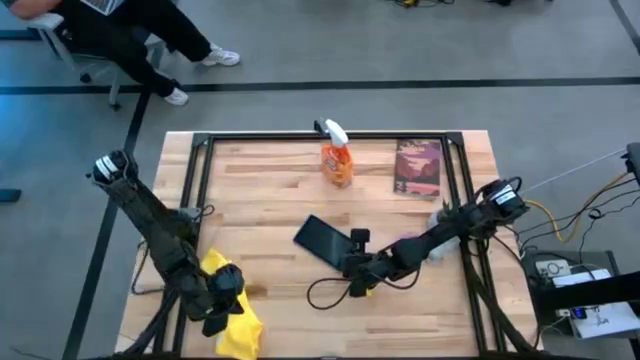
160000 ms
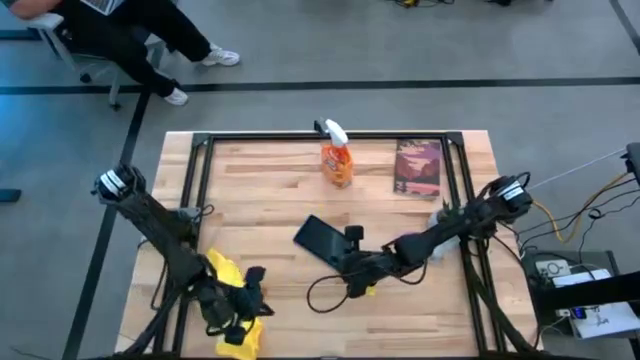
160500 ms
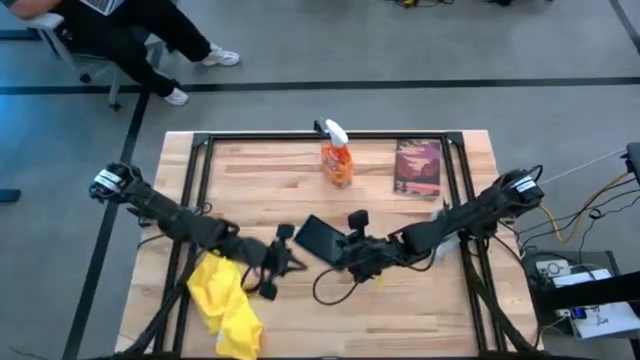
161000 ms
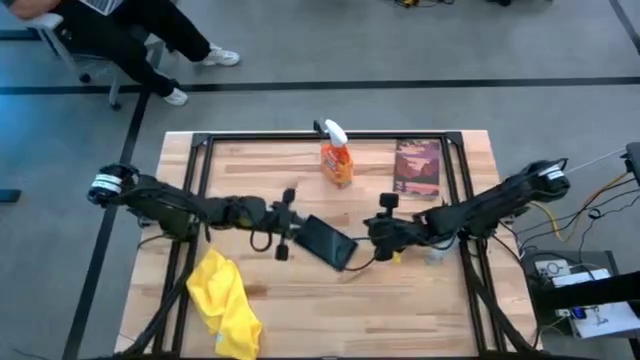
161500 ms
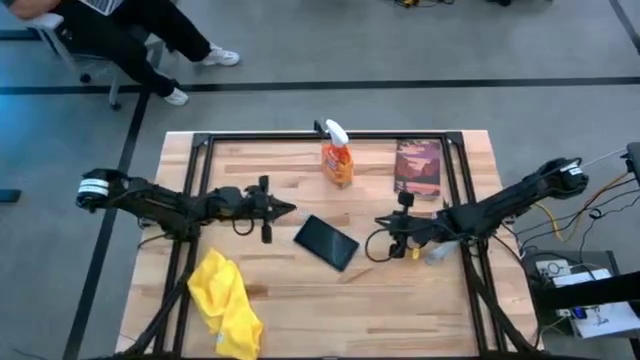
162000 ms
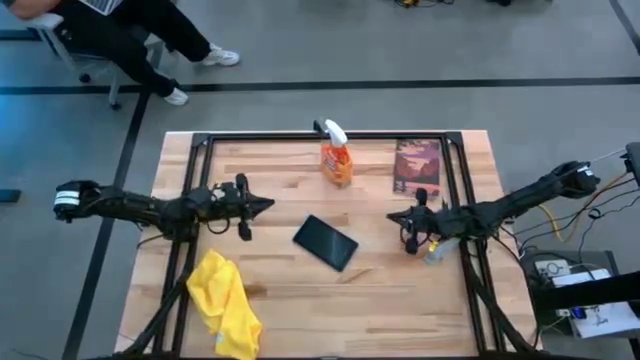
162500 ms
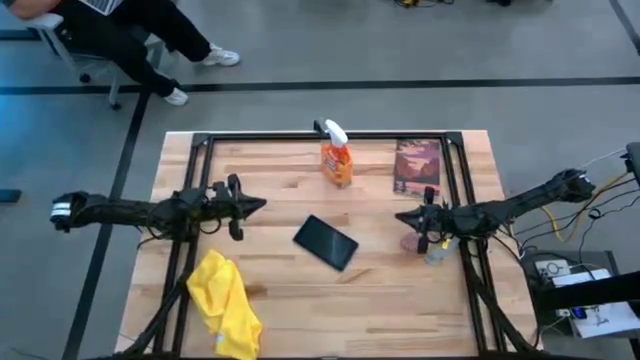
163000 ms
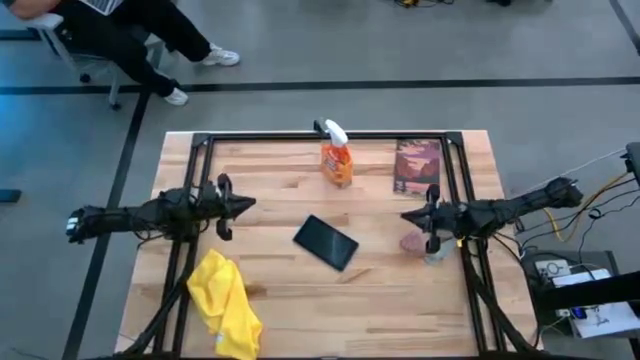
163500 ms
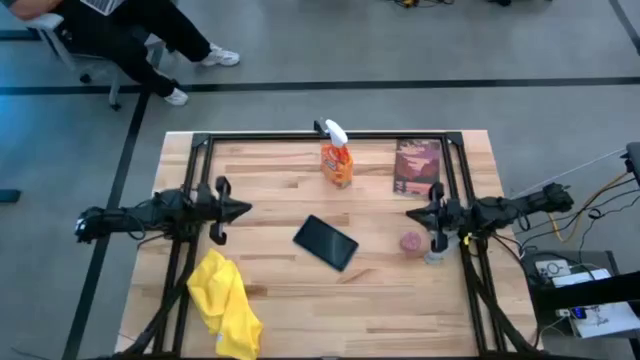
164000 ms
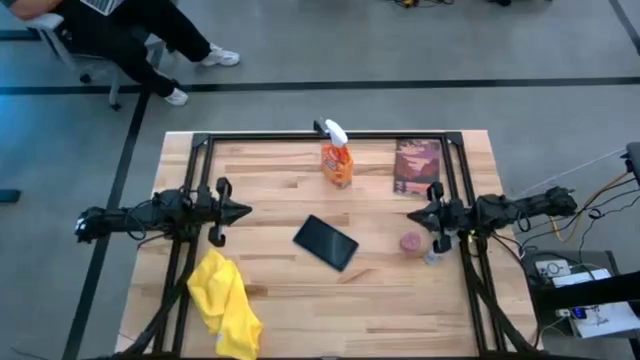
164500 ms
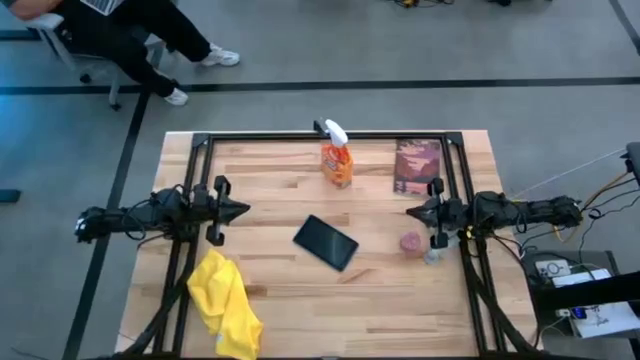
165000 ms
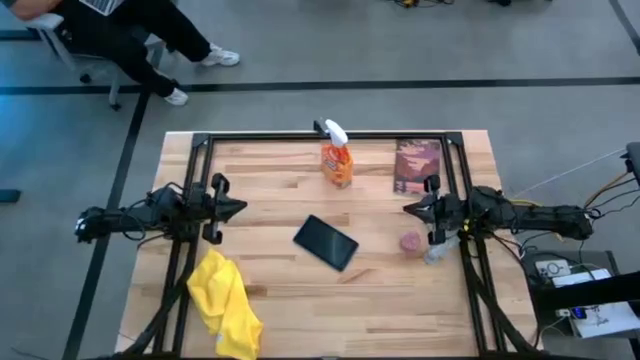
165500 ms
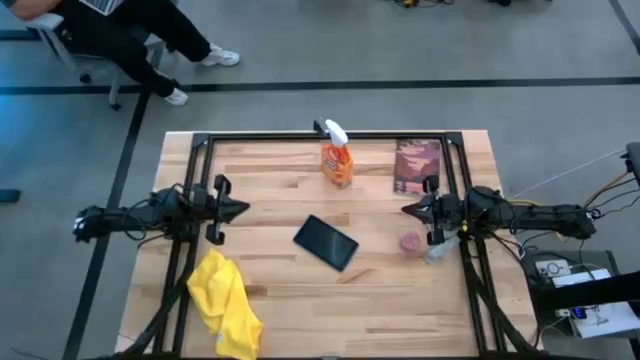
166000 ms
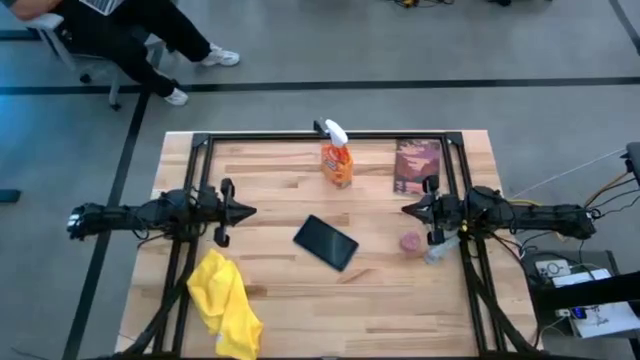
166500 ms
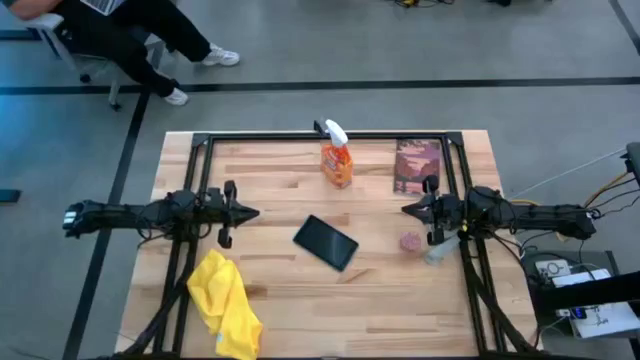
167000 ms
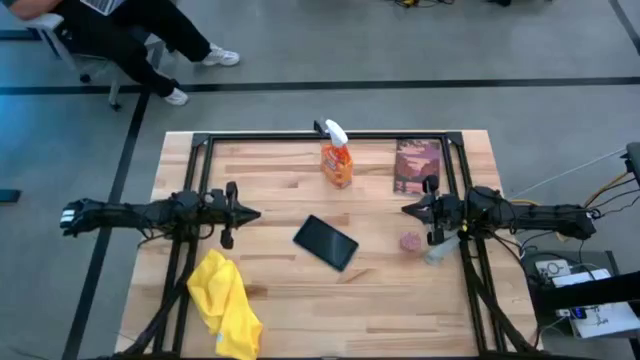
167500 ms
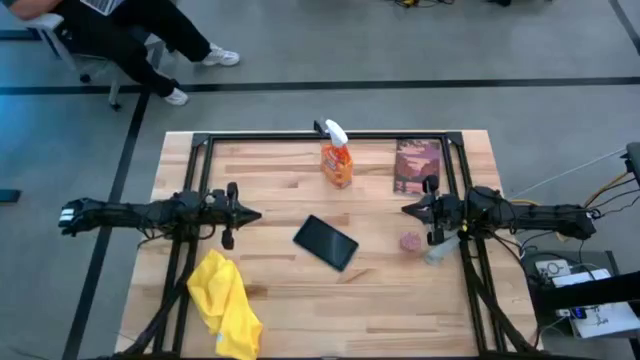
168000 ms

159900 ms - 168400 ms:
Task: Apply microfiber cloth
Return to Home Position

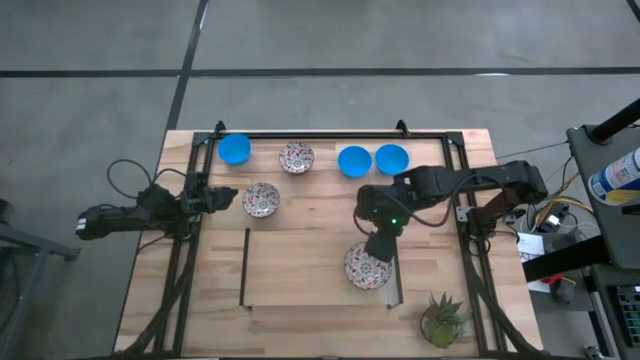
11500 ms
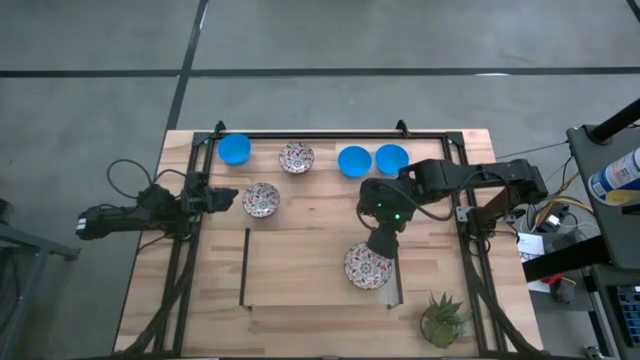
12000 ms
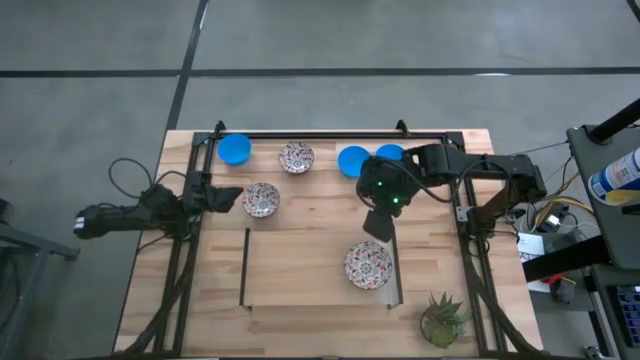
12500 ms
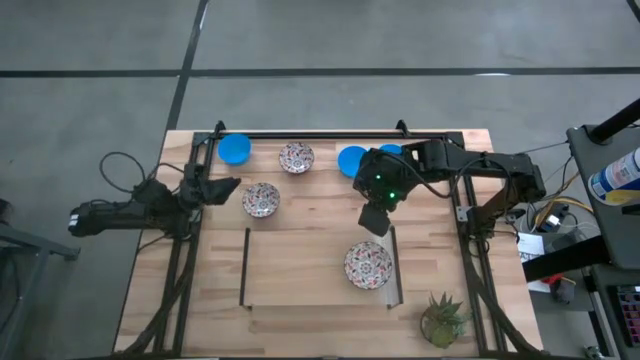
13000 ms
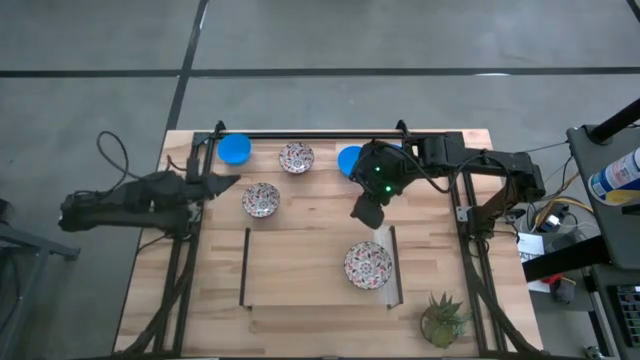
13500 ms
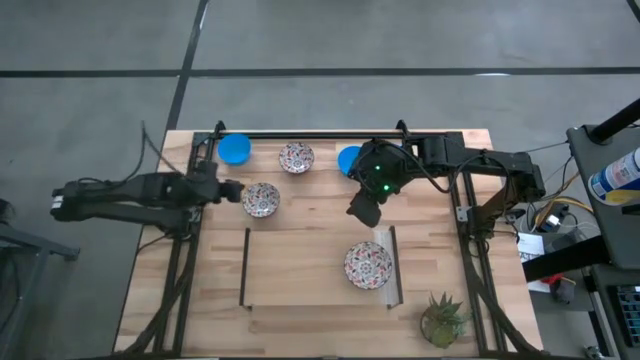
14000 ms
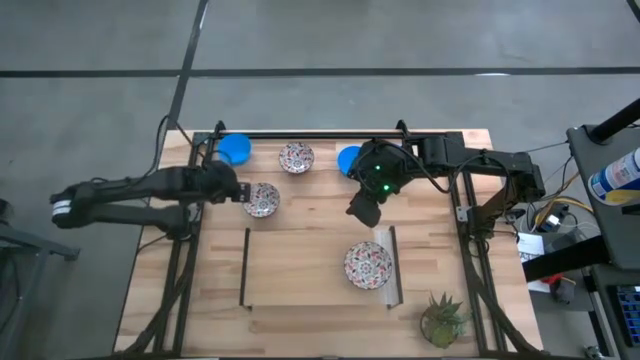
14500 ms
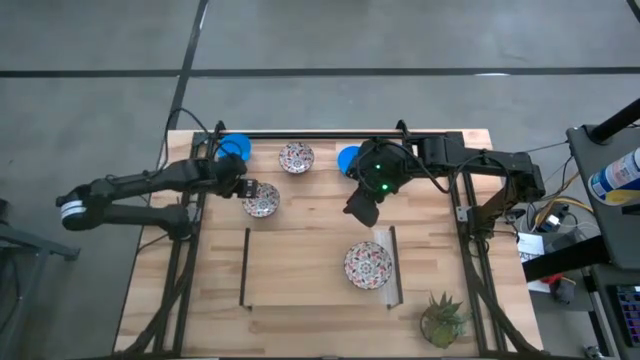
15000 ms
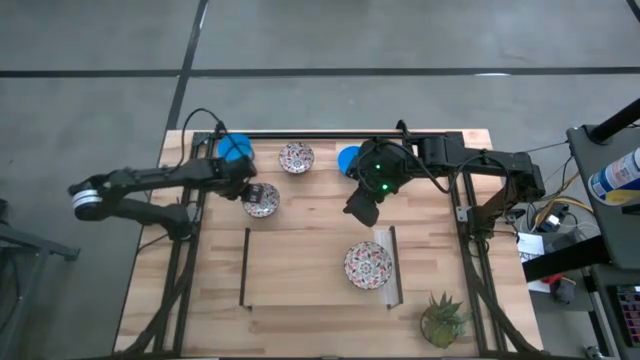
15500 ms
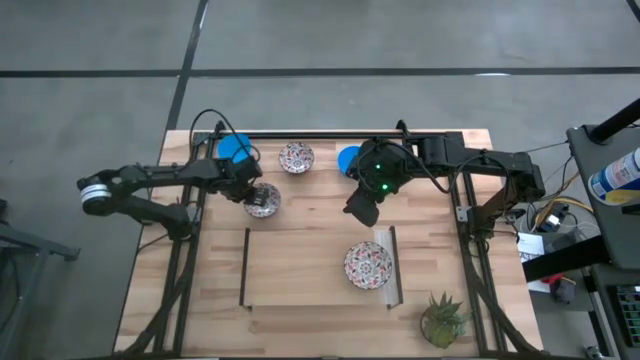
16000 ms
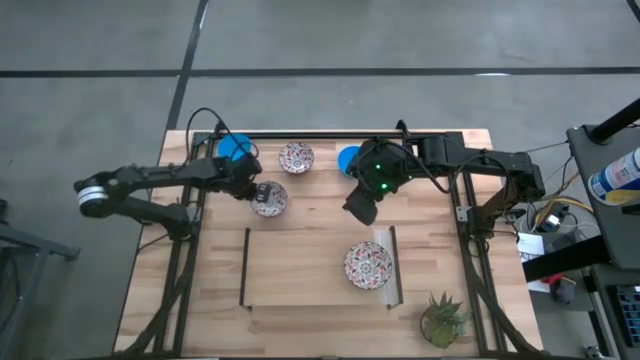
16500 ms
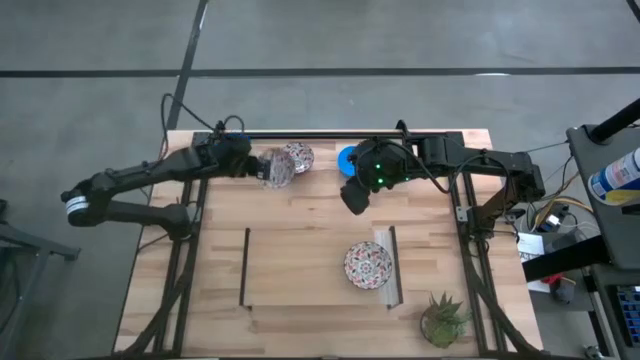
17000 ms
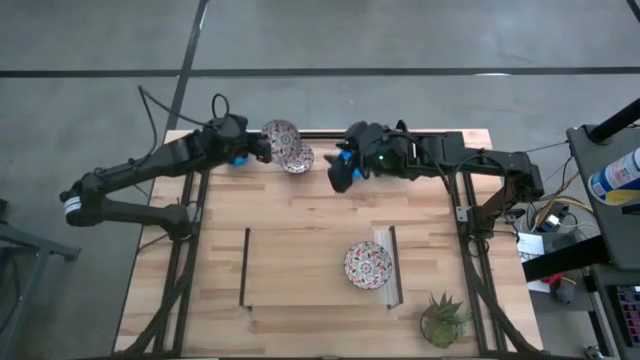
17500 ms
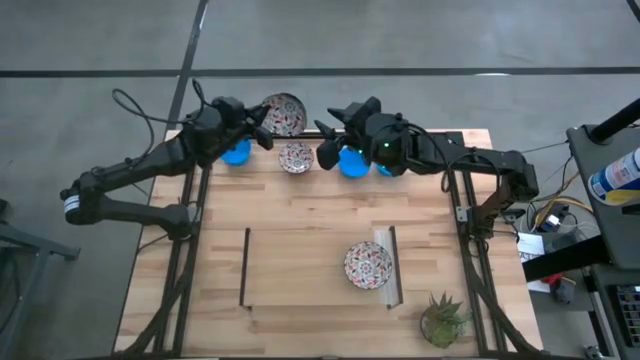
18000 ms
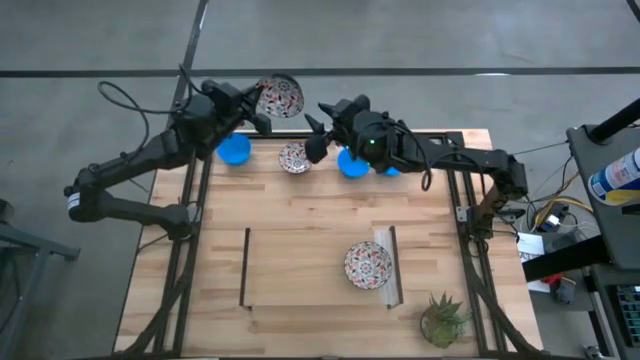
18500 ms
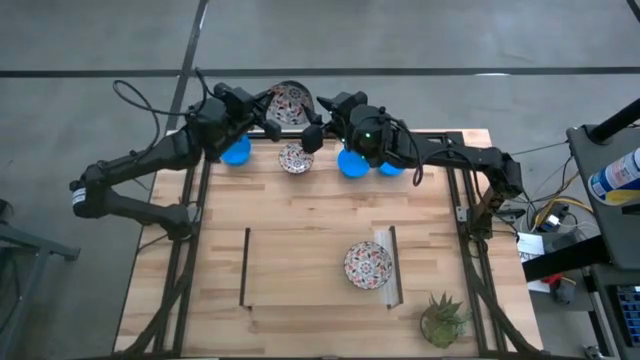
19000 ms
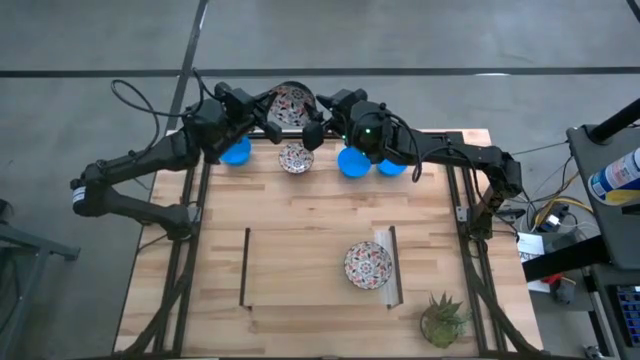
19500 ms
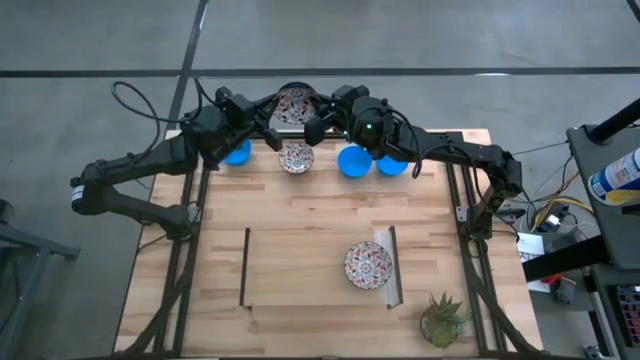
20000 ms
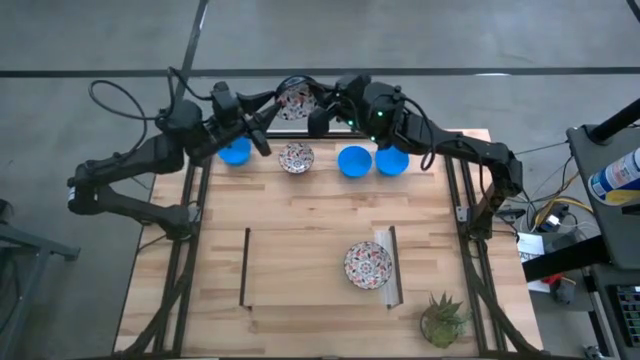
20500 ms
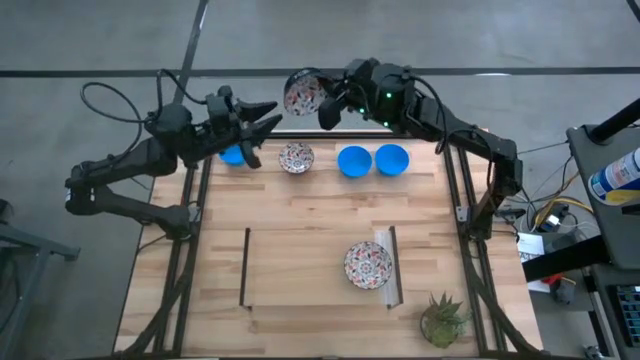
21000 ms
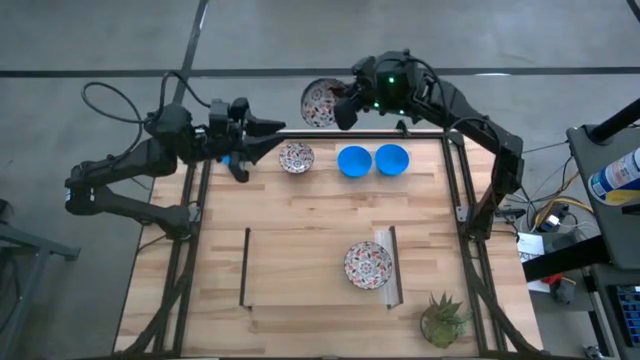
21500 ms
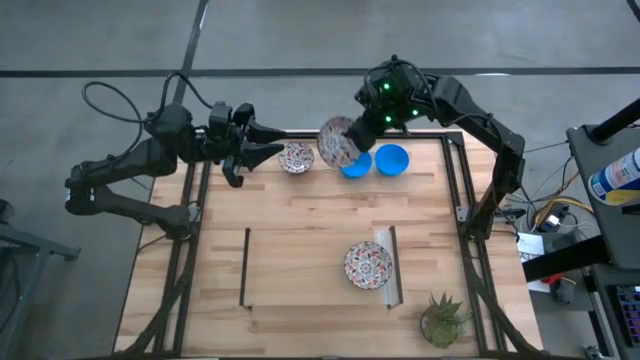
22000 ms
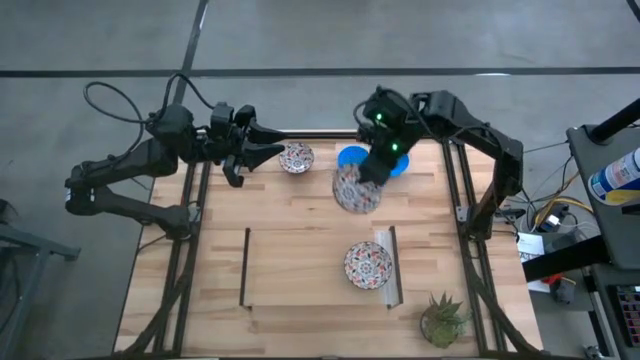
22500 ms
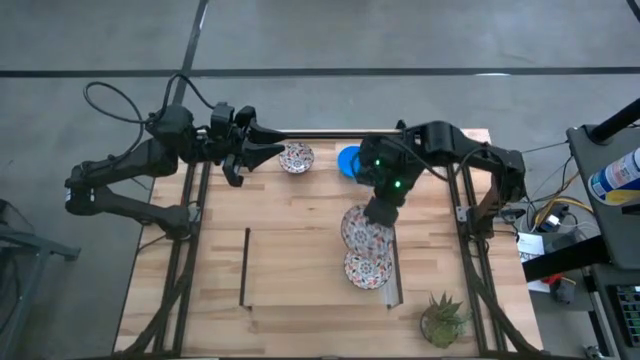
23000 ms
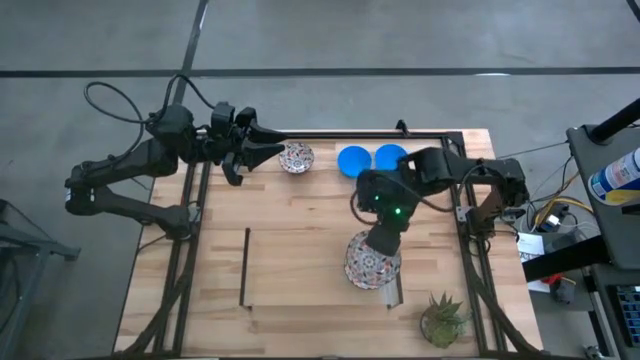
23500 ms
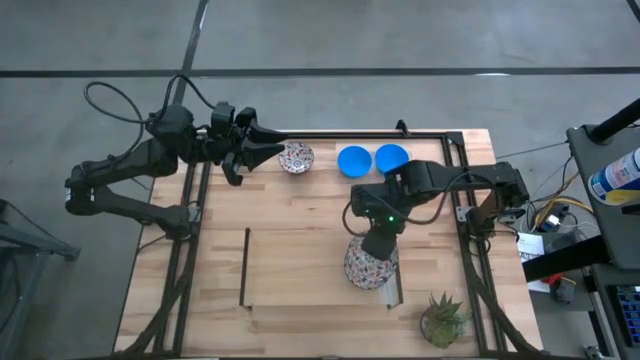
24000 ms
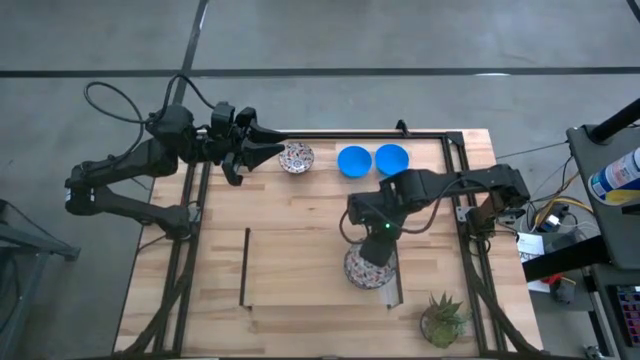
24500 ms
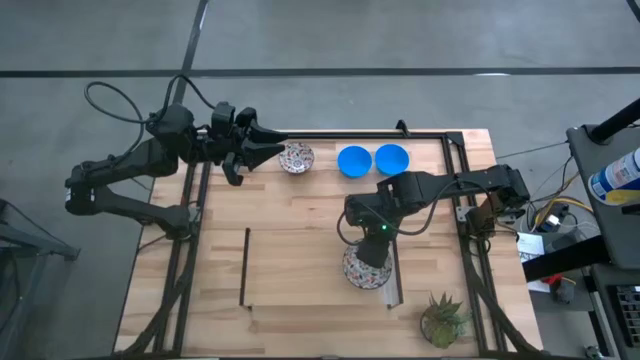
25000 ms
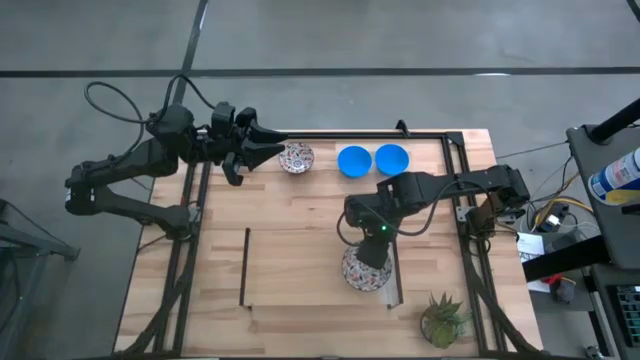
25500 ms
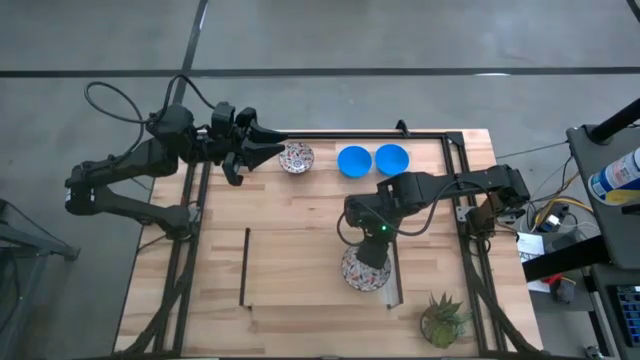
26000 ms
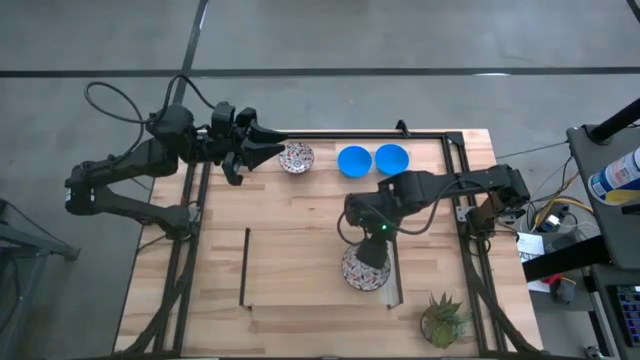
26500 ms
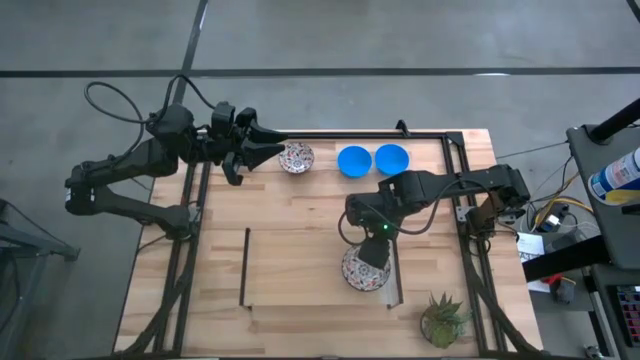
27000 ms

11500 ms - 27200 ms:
Task: Pick & Place Mini bowls
Stack the bottom white patterned bowl on top of the other white patterned bowl on the shelf
